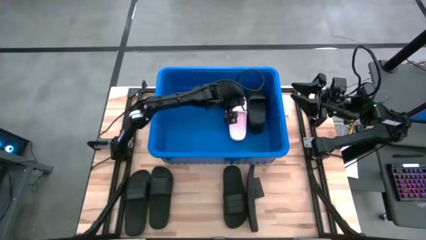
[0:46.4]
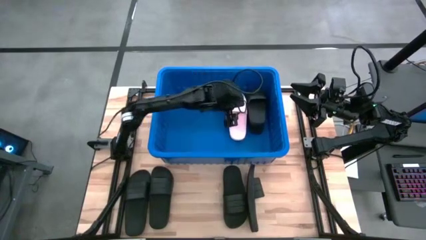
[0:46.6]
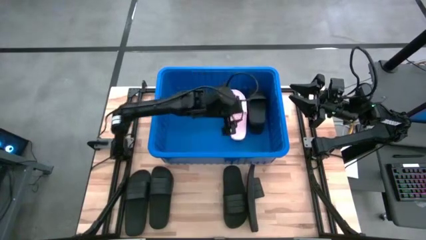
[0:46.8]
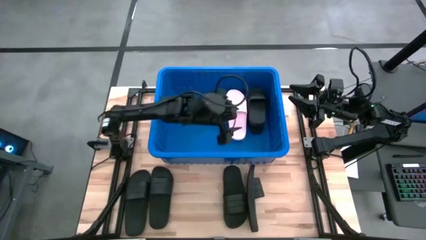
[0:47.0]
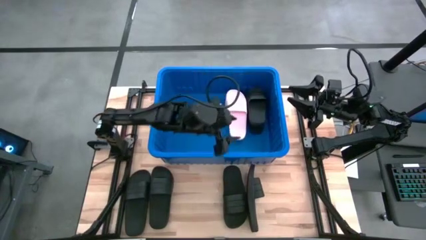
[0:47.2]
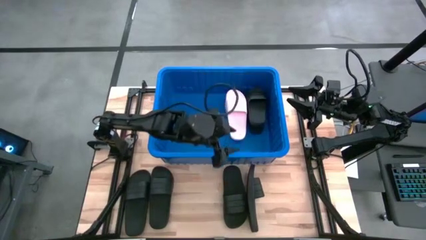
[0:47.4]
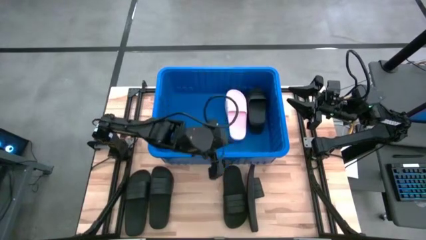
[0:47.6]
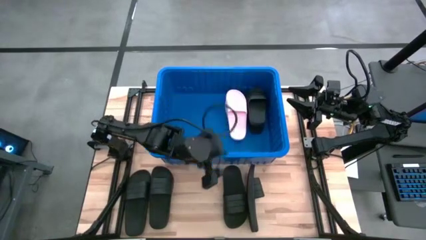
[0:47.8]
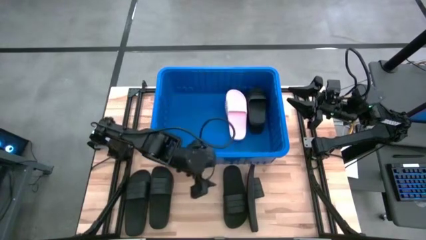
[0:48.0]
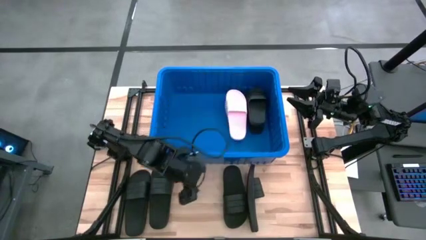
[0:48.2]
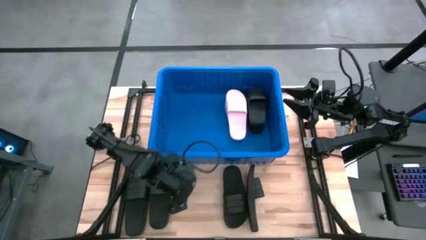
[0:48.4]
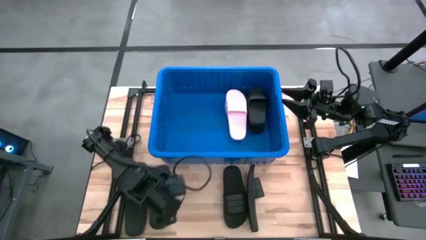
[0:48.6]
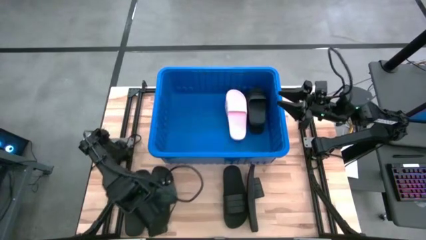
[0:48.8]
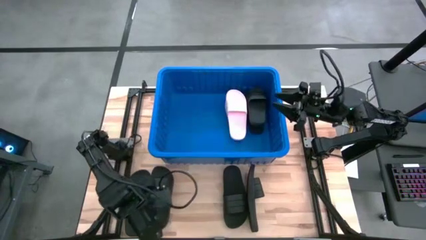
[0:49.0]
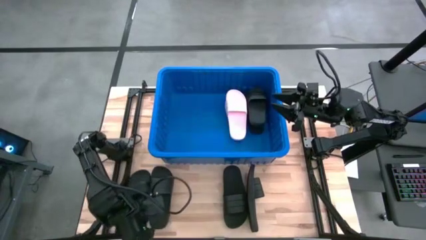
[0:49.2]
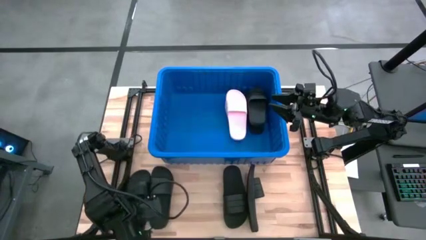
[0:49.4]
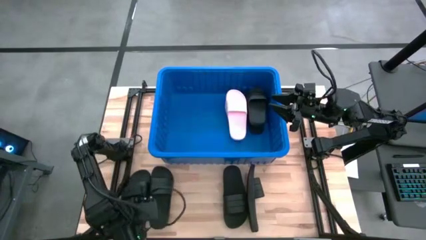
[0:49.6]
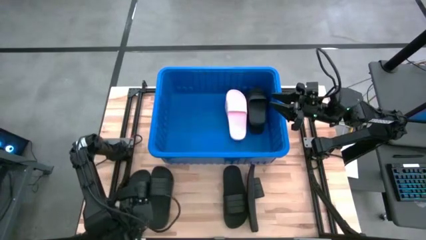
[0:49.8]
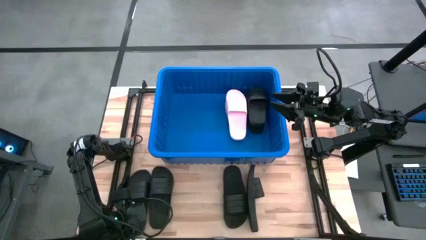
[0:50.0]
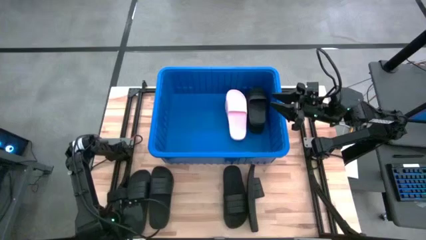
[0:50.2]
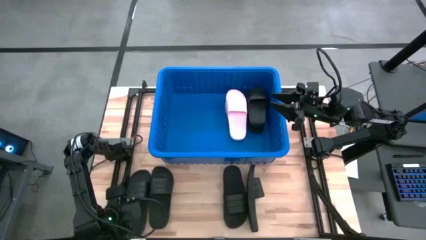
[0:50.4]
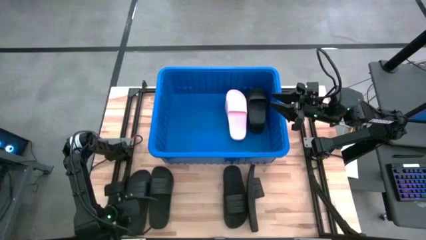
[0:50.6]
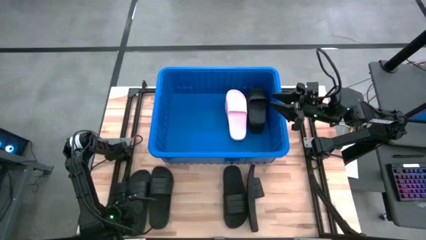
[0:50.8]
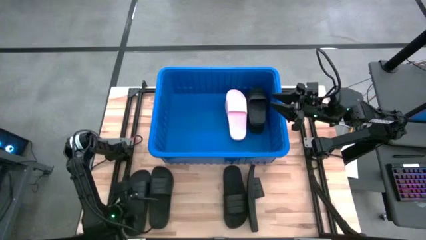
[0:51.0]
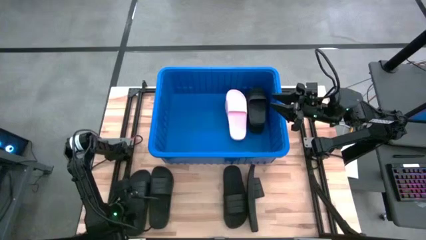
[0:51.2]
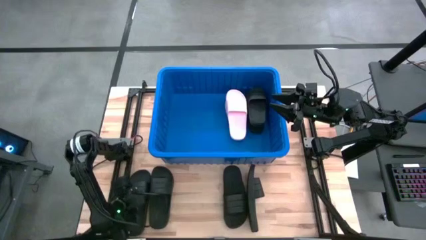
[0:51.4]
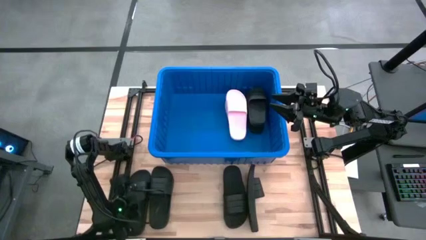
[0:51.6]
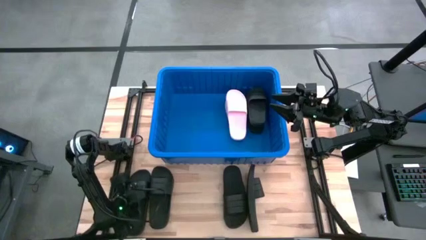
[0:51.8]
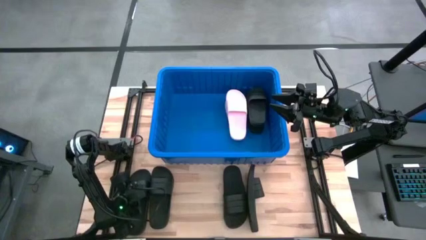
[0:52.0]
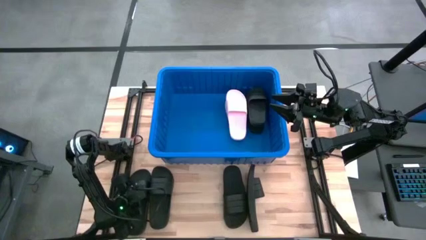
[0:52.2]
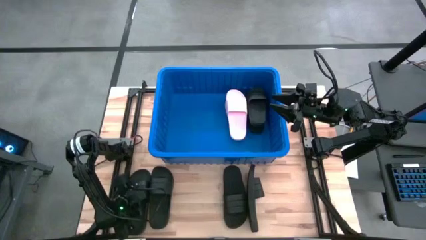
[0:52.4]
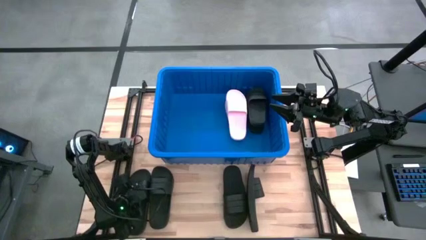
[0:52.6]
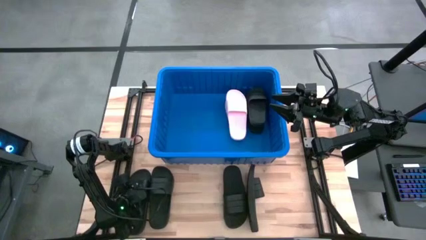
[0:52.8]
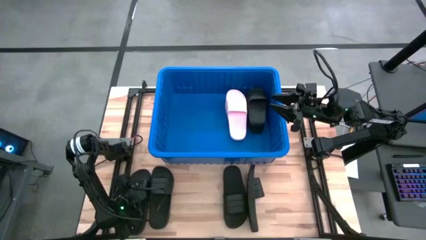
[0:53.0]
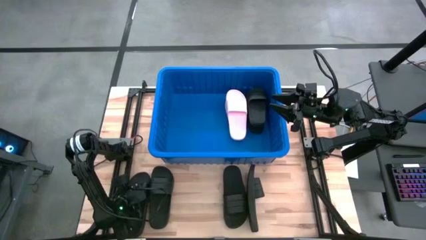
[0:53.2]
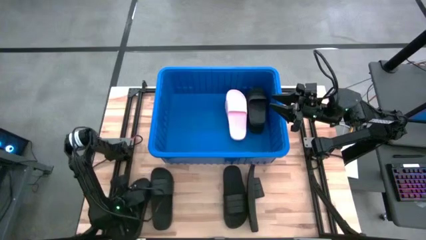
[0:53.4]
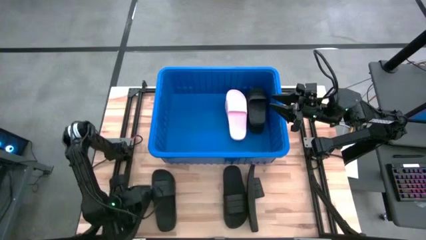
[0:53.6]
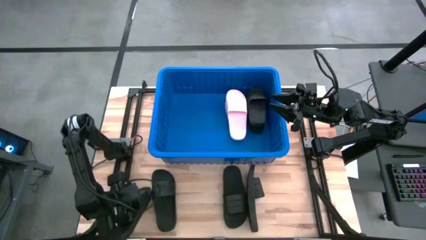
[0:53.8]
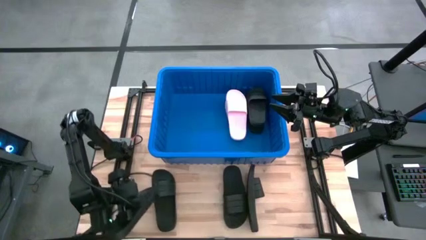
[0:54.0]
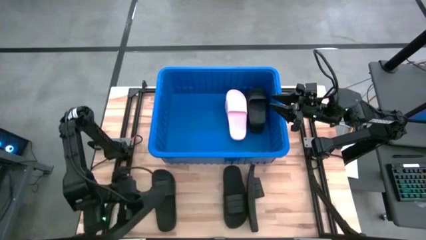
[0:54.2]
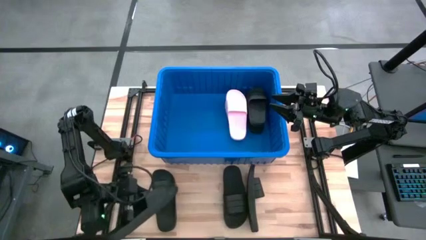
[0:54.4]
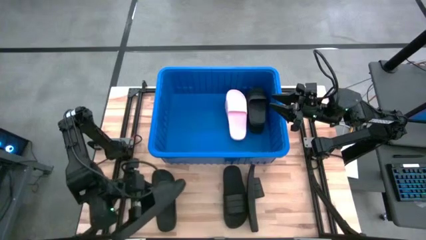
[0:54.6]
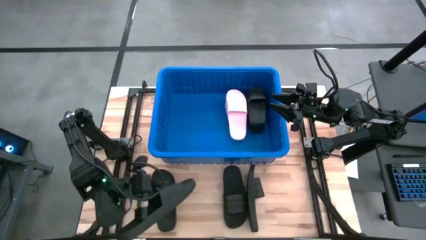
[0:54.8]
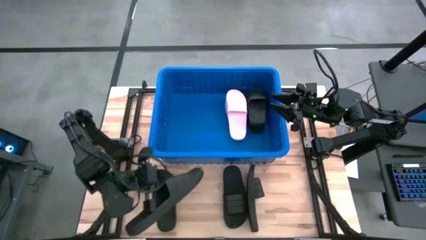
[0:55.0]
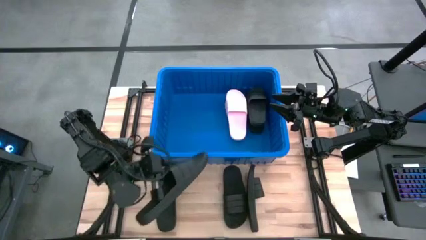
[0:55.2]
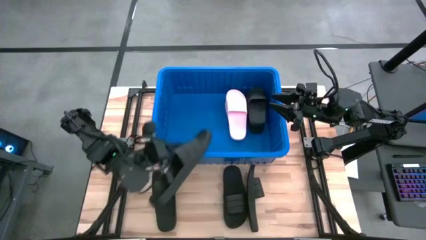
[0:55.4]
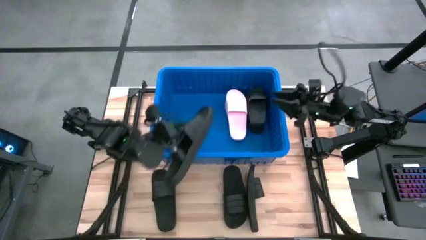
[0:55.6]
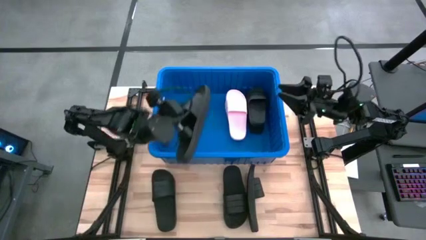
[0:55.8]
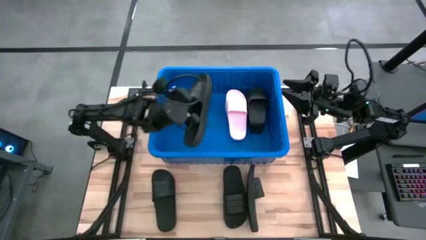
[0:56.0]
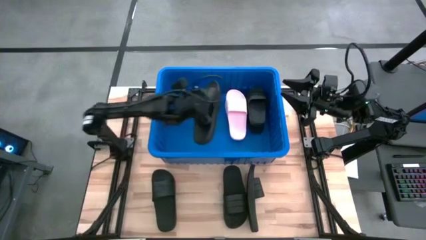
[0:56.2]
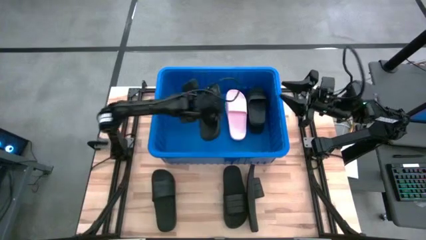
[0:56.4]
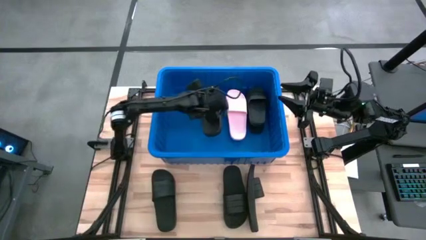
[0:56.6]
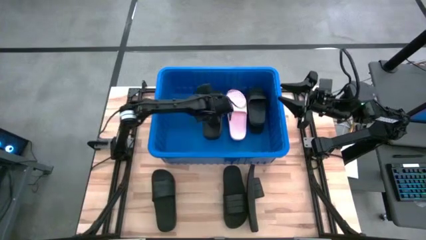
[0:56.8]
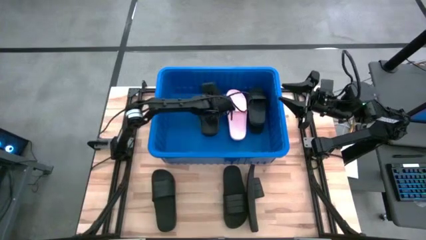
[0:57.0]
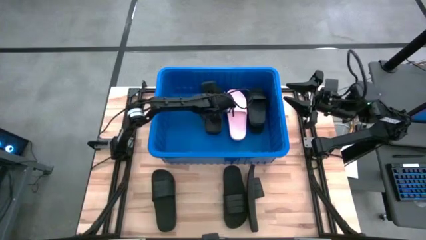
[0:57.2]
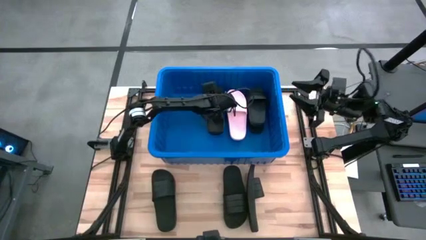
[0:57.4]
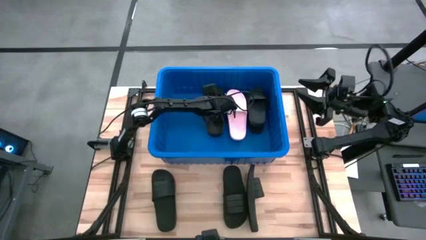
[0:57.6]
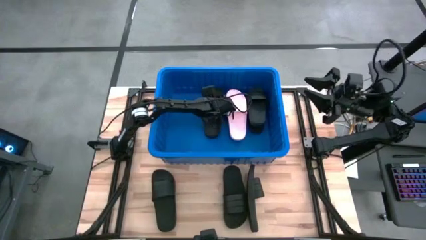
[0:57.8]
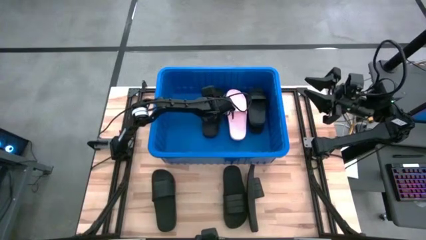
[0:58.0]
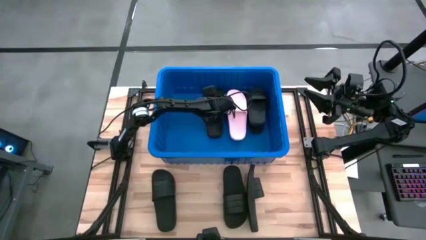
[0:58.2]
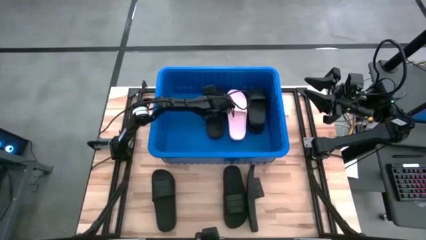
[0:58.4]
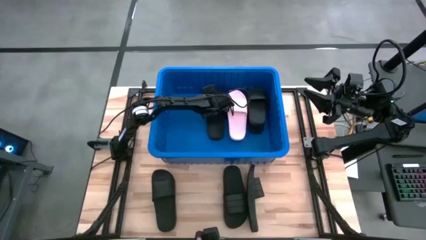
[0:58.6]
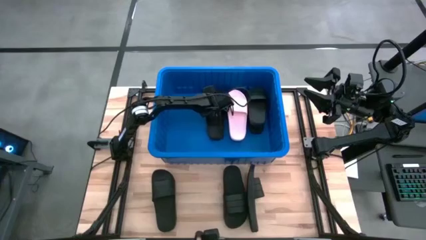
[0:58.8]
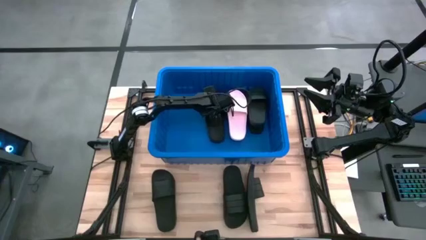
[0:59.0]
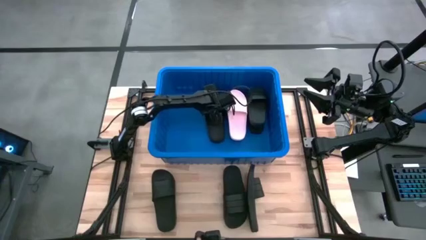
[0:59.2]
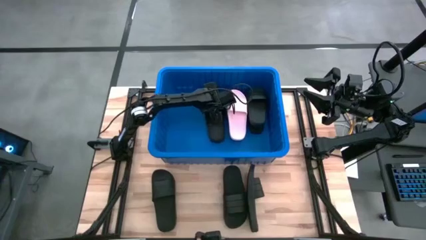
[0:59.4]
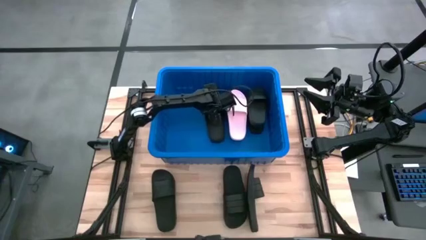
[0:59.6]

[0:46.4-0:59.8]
Task: Pick and place slides into bin
Put the black slide into the bin

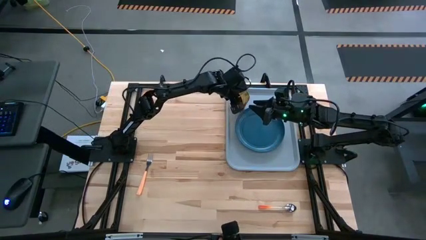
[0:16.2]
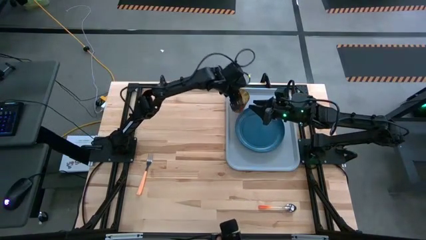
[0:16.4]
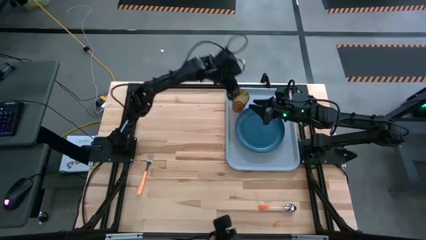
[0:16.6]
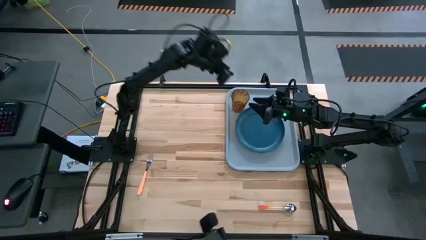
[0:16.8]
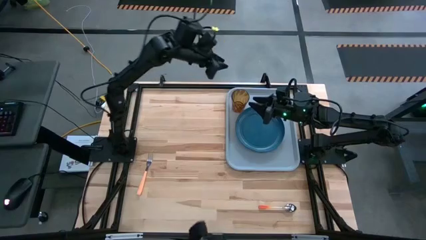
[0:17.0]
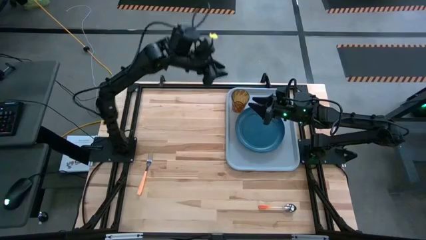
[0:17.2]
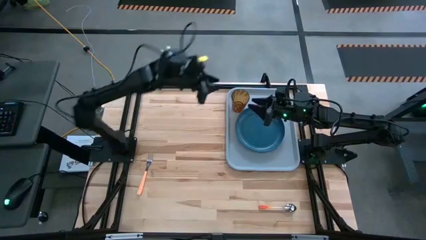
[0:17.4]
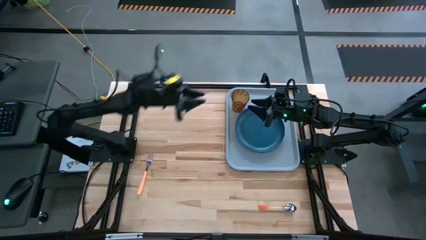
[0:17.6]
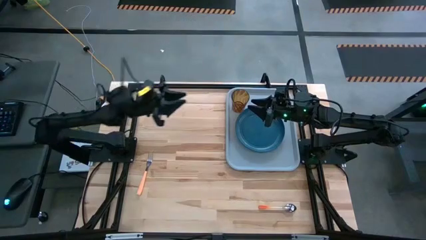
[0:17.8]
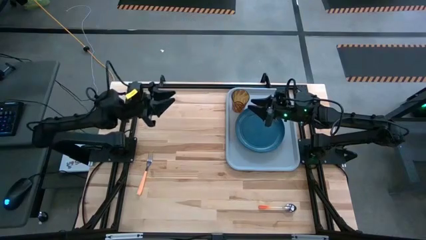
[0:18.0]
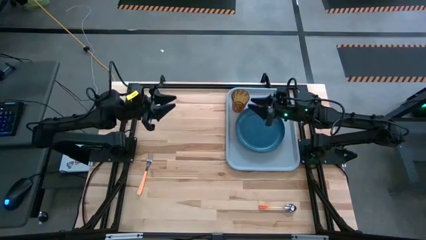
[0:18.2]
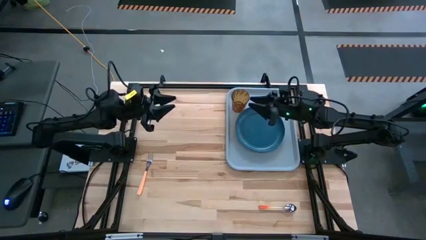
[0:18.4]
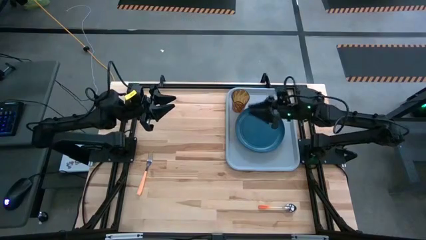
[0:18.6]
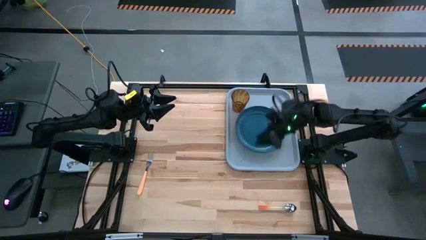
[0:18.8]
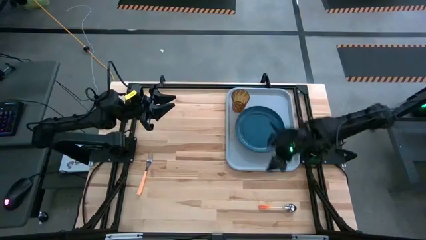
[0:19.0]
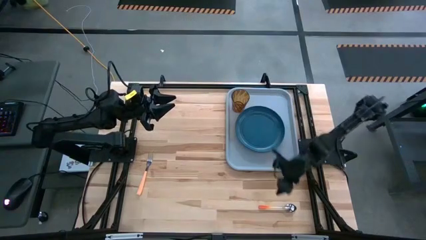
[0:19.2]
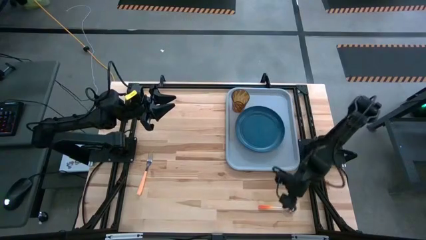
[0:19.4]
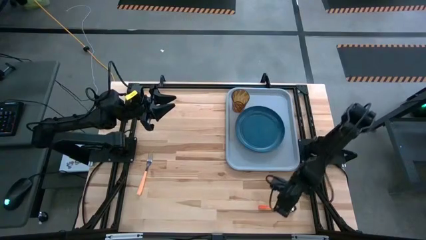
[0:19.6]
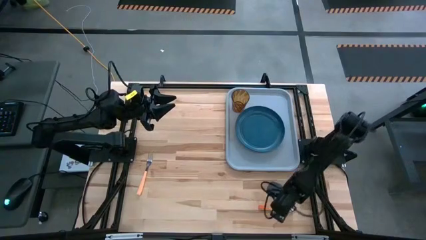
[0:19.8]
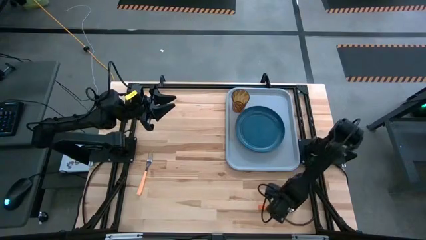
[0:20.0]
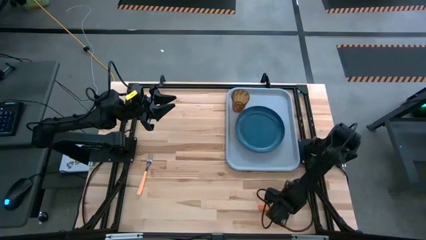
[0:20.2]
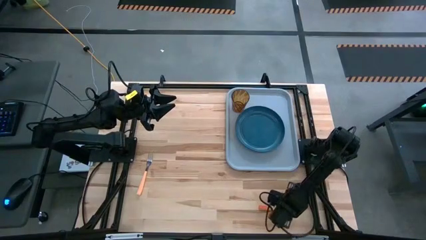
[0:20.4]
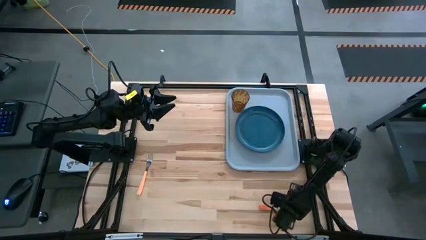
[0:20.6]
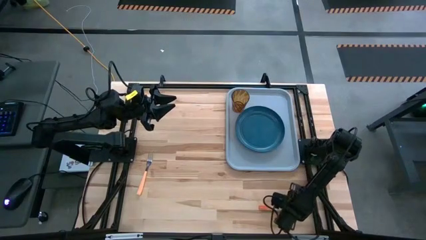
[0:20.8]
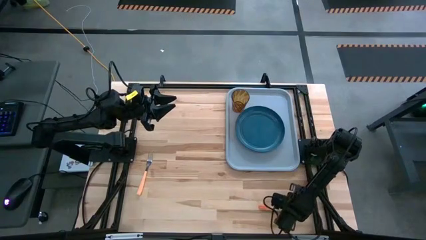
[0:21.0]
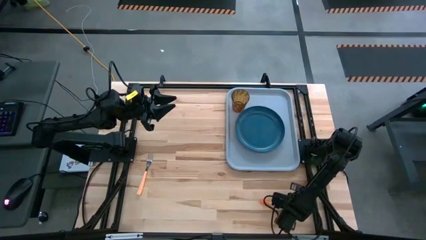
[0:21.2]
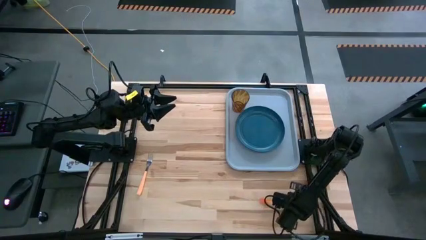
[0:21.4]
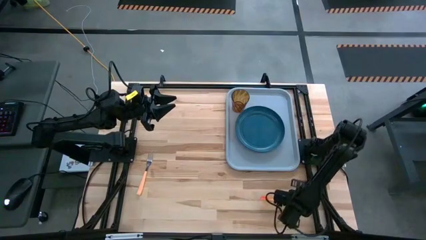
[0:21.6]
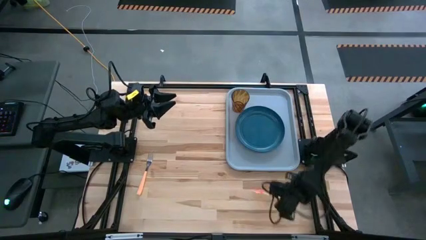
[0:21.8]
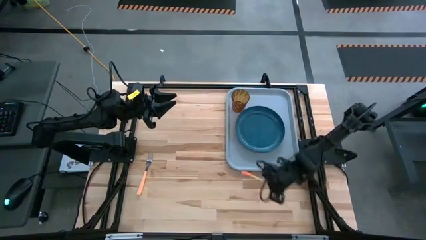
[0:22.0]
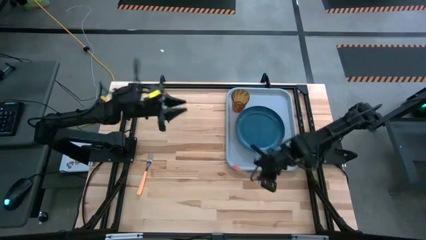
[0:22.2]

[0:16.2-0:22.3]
Task: Pick and place plate/cup/fork/spoon on tray
Put the orange spoon on the gray tray to the bottom of the blue plate
